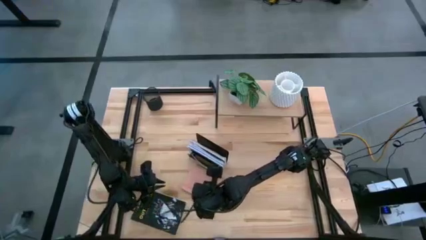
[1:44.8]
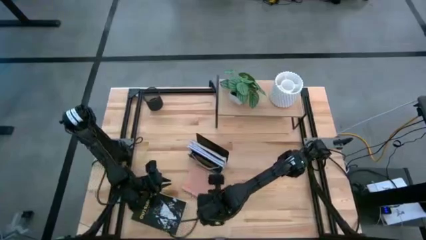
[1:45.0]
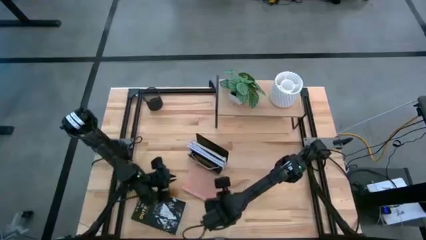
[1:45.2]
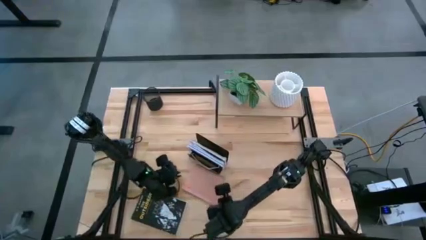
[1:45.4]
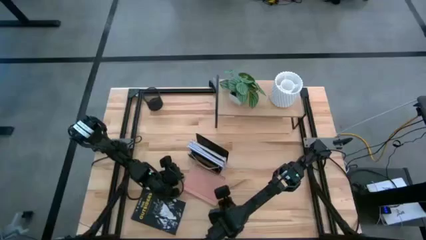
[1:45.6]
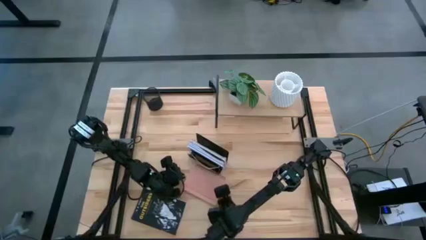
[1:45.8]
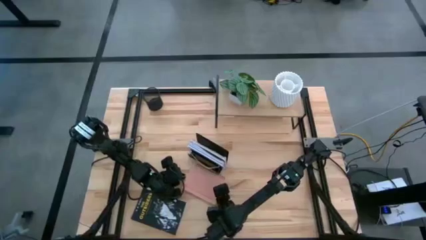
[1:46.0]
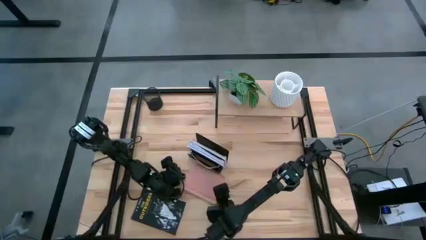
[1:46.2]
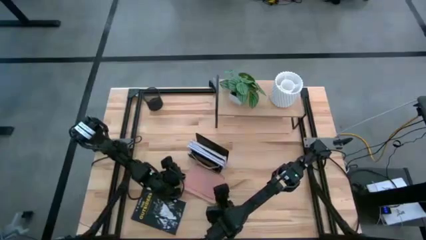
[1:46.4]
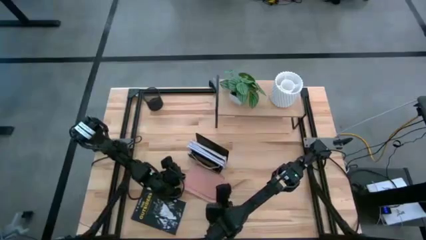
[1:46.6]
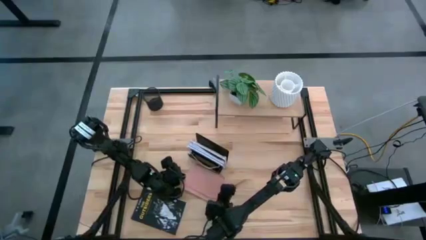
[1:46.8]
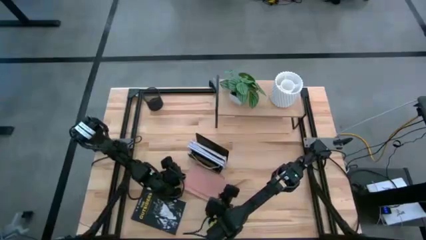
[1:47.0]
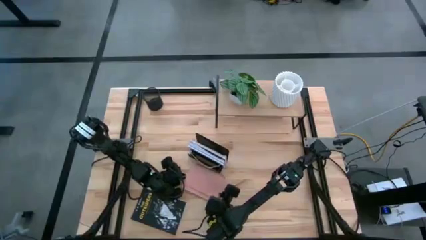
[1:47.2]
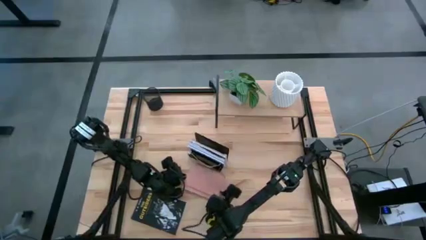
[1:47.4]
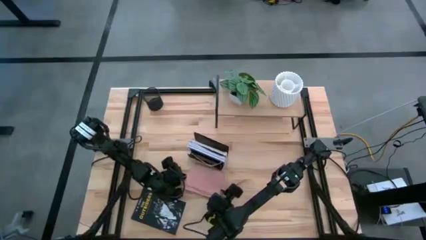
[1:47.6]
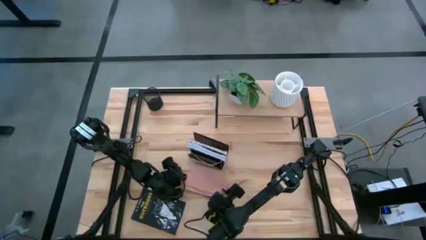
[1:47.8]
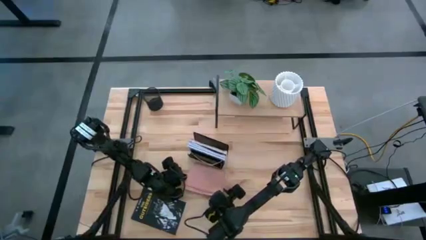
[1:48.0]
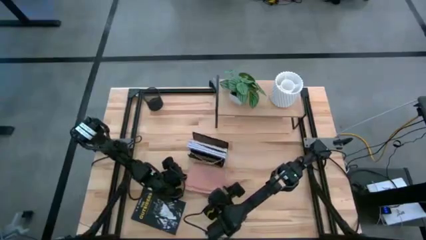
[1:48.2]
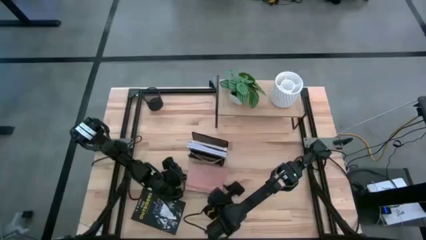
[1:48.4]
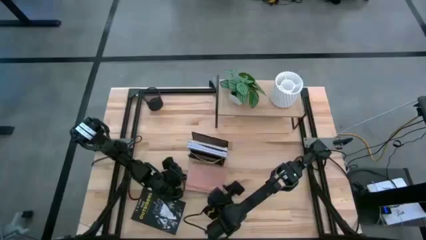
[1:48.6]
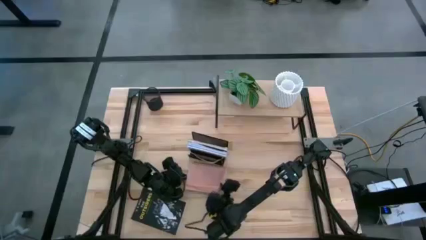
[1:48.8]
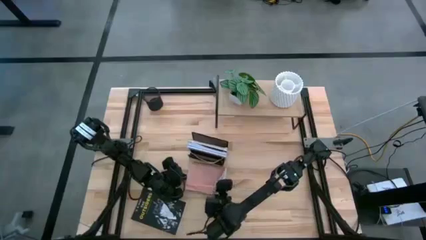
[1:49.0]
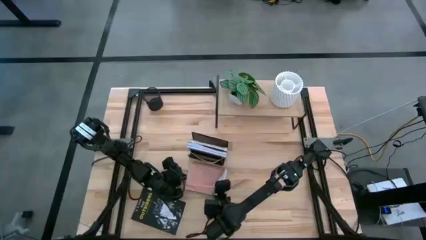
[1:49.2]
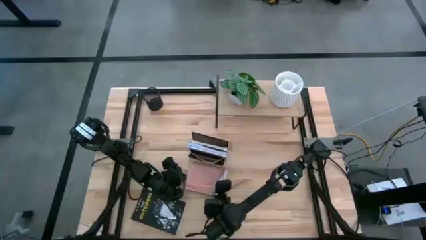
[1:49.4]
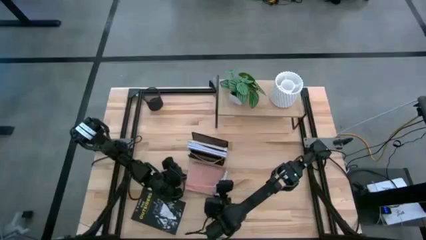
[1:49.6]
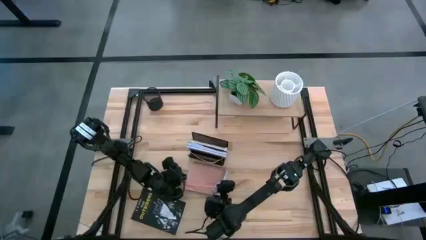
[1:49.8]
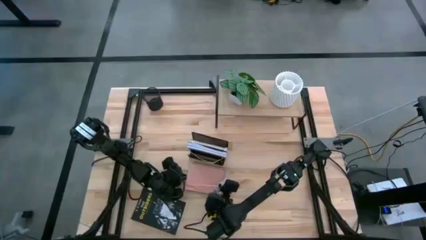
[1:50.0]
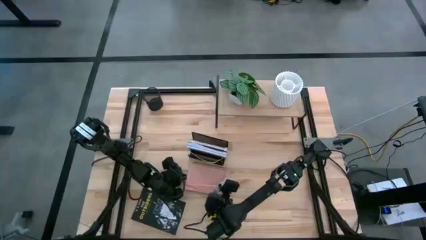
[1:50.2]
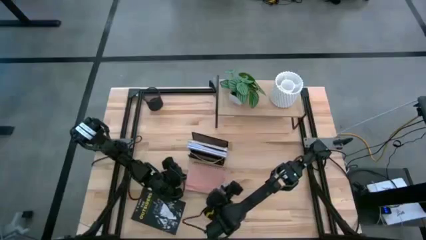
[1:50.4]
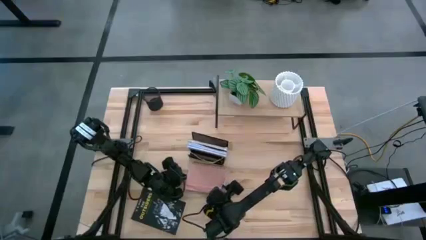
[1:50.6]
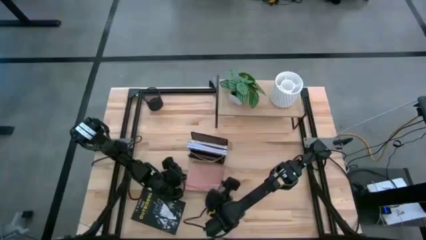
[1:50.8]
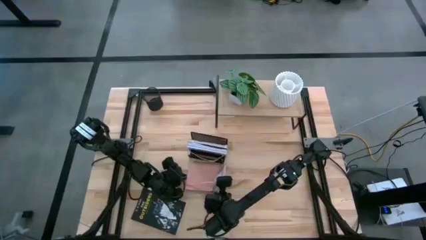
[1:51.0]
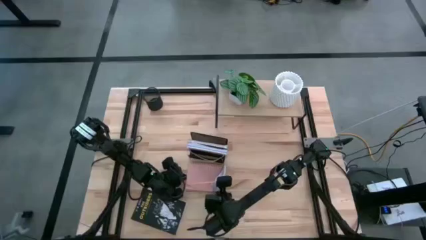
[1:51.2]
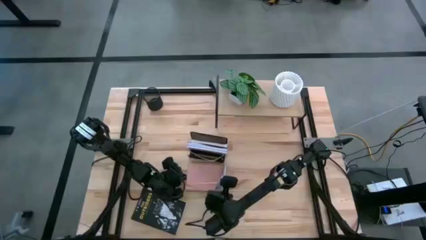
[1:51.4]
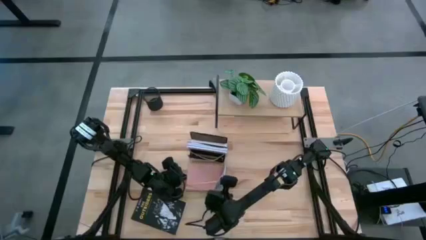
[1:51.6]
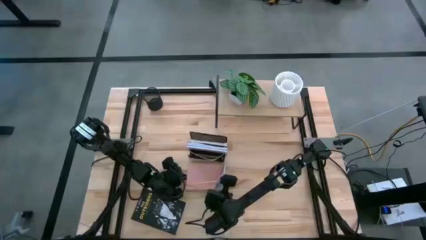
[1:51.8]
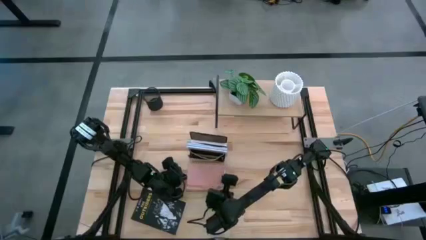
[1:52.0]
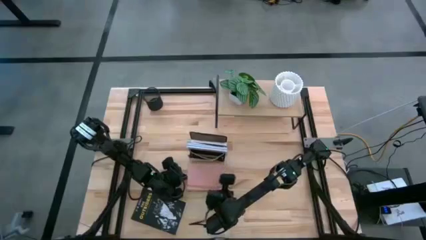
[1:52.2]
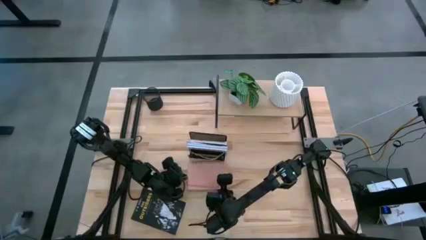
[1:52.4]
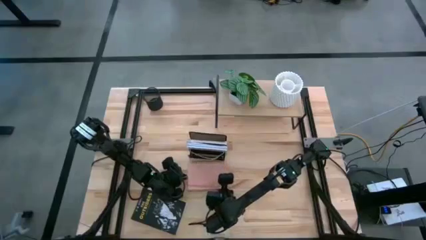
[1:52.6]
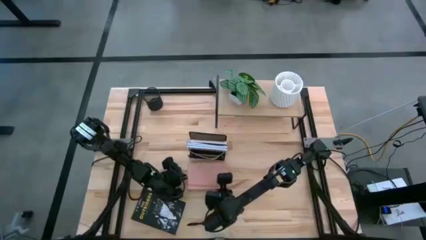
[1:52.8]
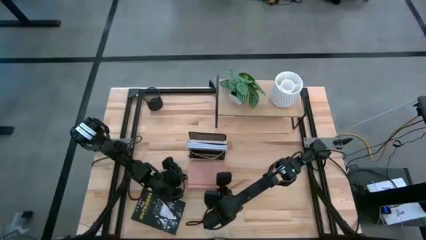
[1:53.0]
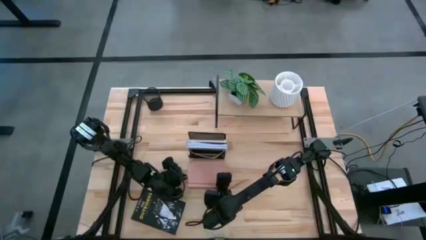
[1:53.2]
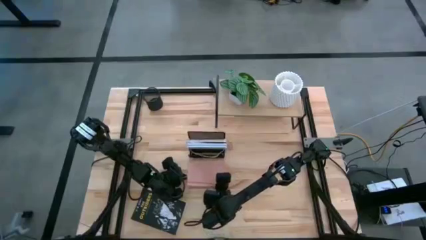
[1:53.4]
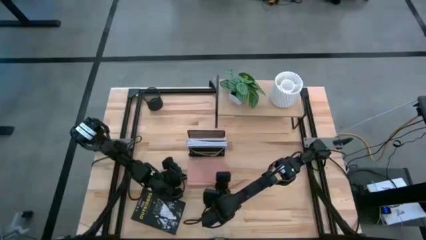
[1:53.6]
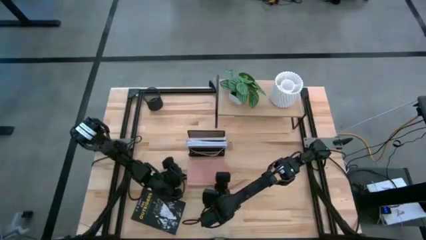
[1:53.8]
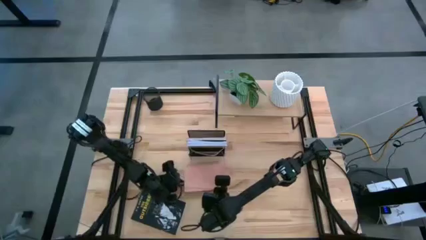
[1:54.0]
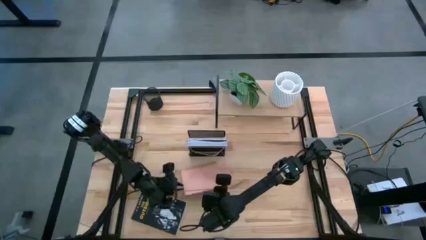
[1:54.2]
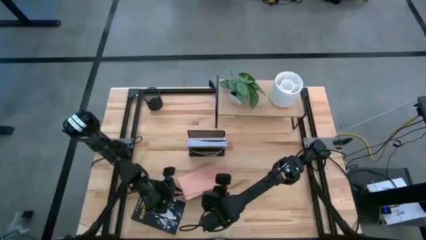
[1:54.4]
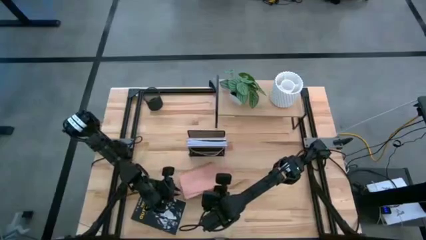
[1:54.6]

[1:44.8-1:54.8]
Task: Stock shelves
Put the pink notebook into the black mesh bookshelf
